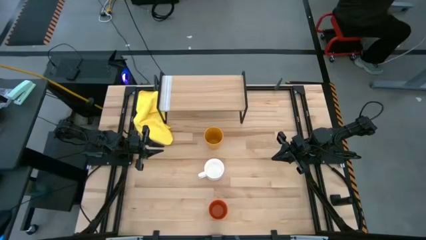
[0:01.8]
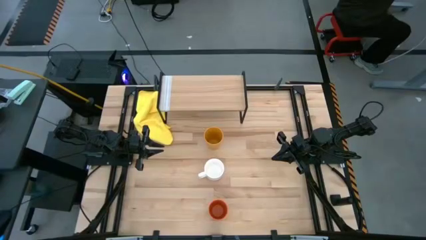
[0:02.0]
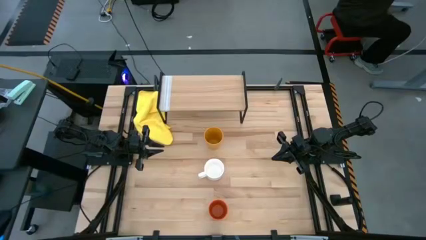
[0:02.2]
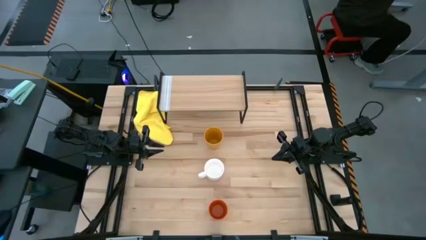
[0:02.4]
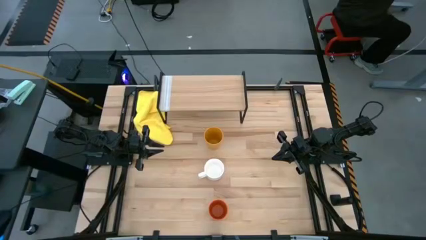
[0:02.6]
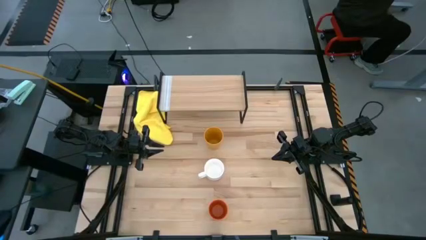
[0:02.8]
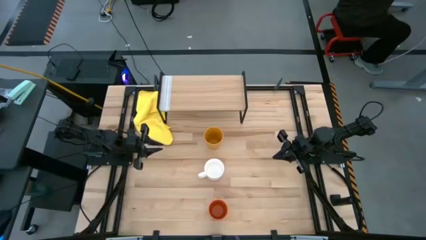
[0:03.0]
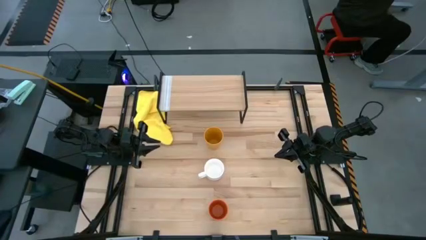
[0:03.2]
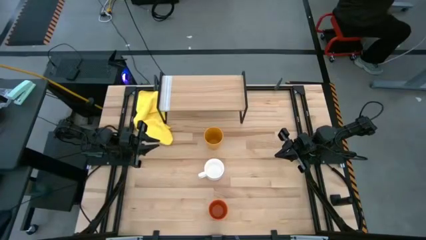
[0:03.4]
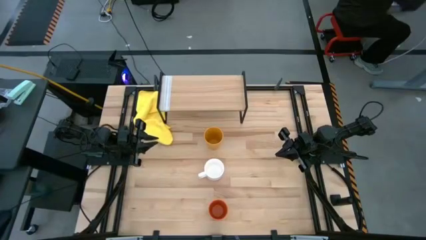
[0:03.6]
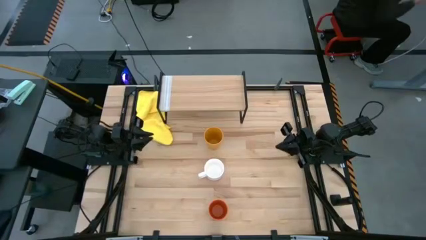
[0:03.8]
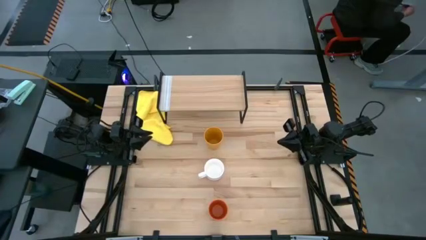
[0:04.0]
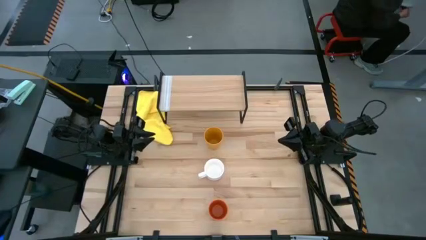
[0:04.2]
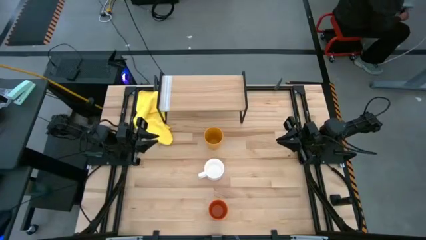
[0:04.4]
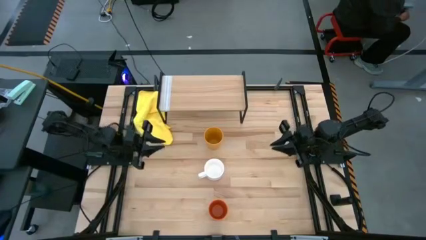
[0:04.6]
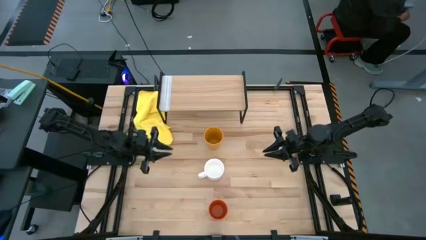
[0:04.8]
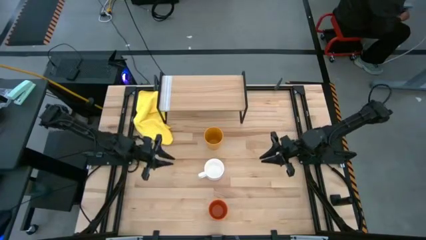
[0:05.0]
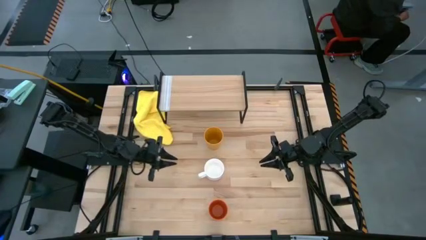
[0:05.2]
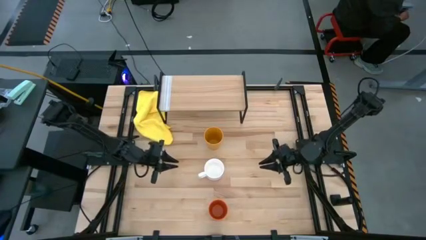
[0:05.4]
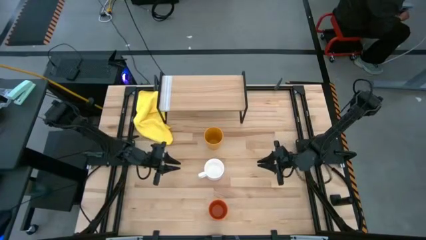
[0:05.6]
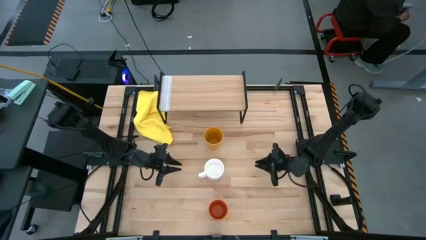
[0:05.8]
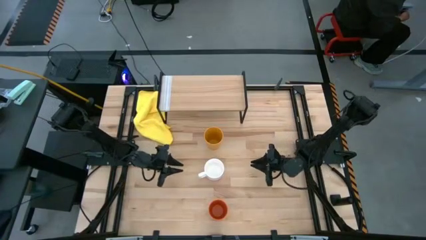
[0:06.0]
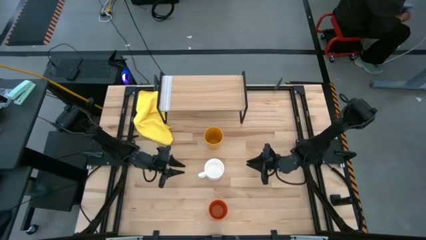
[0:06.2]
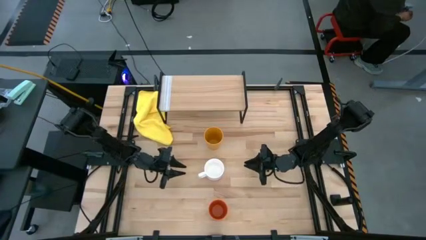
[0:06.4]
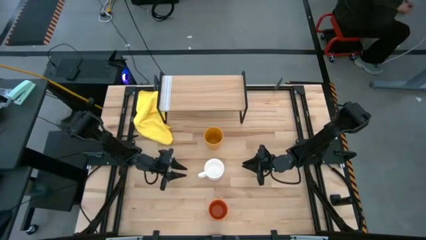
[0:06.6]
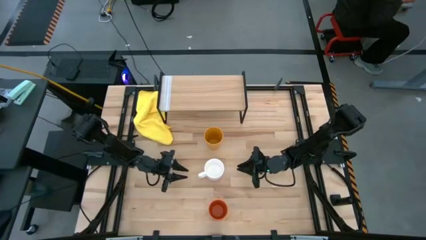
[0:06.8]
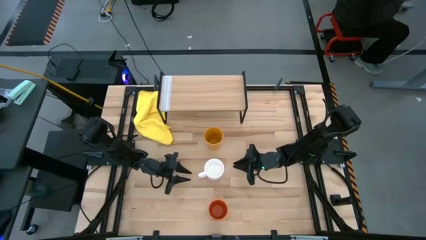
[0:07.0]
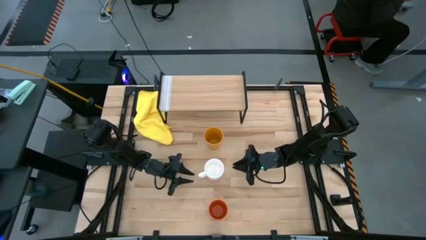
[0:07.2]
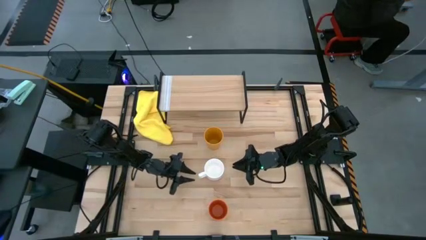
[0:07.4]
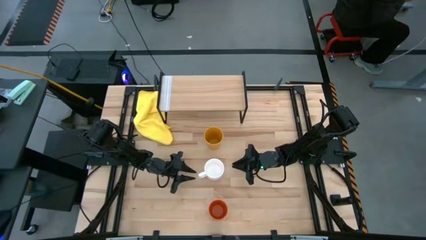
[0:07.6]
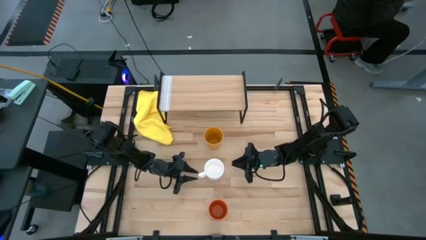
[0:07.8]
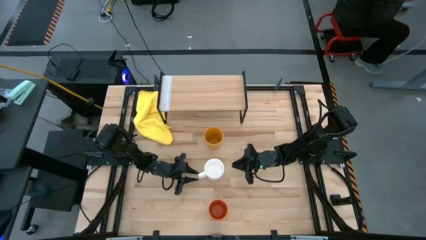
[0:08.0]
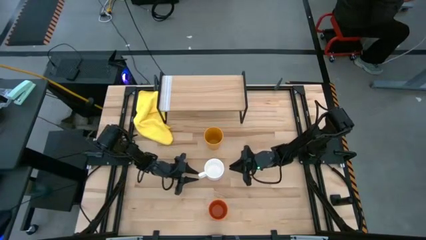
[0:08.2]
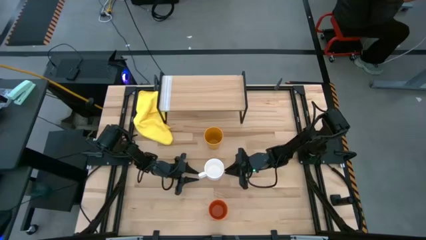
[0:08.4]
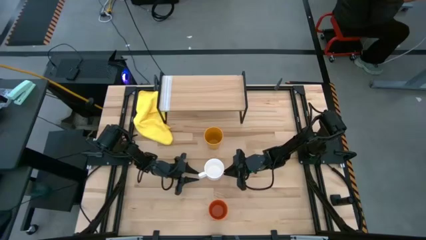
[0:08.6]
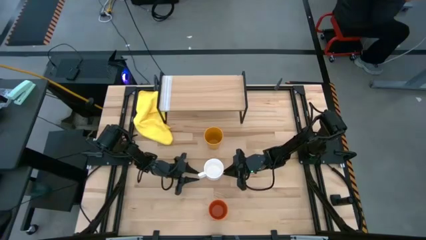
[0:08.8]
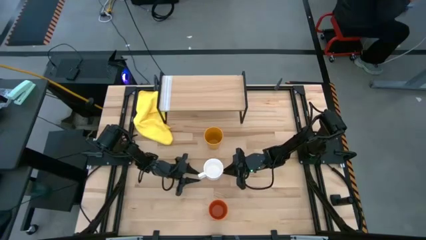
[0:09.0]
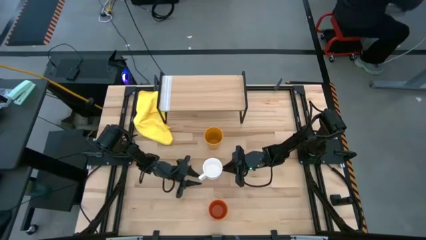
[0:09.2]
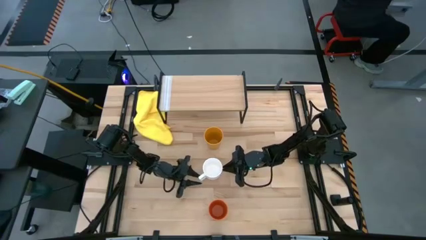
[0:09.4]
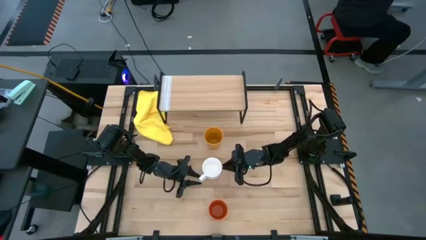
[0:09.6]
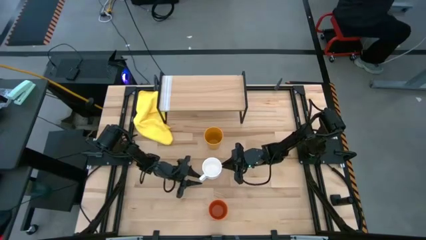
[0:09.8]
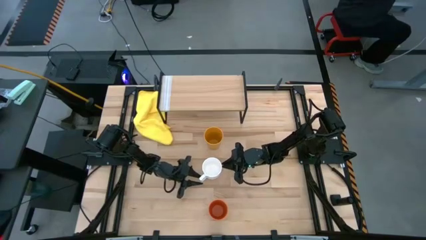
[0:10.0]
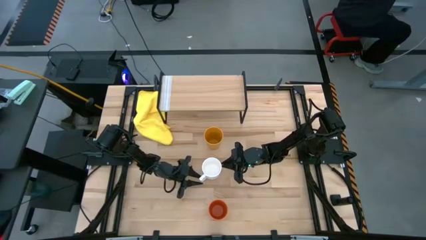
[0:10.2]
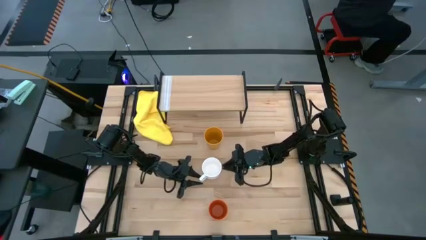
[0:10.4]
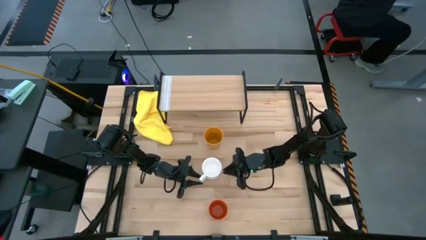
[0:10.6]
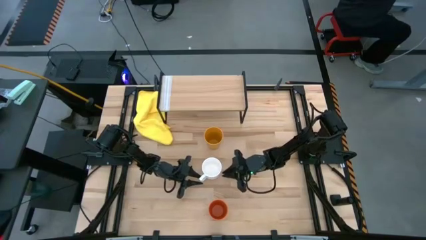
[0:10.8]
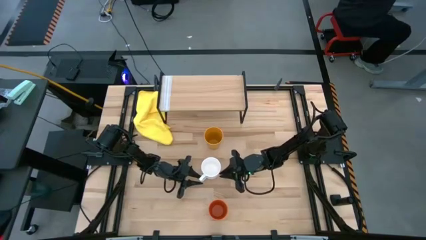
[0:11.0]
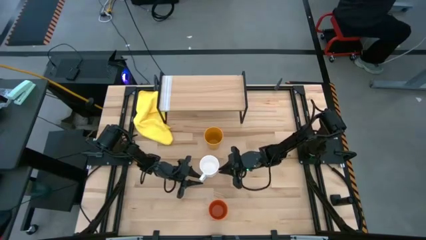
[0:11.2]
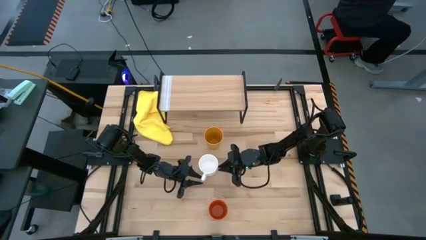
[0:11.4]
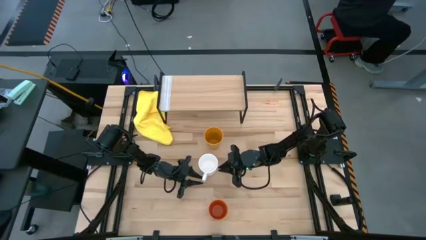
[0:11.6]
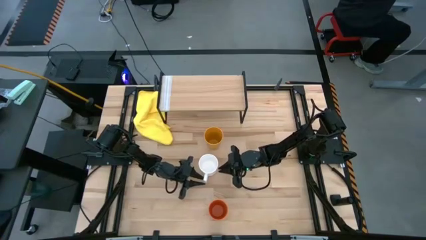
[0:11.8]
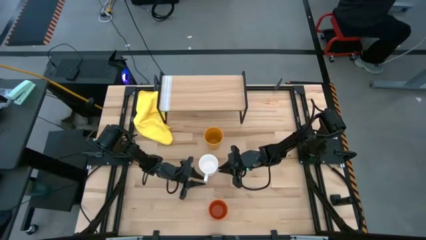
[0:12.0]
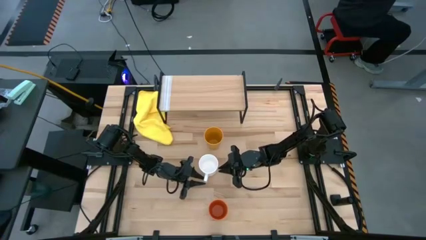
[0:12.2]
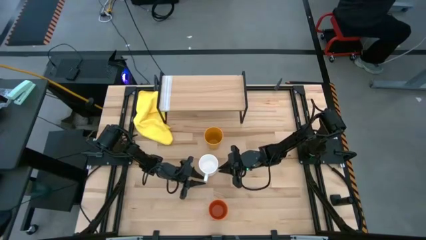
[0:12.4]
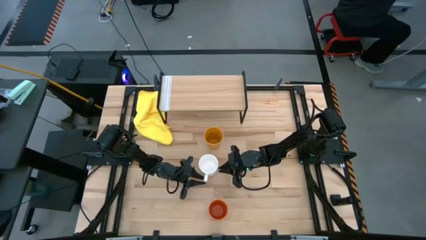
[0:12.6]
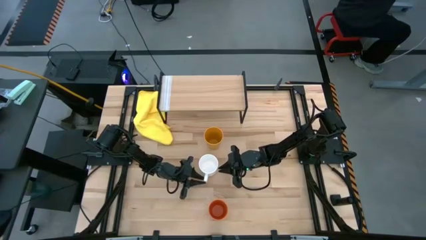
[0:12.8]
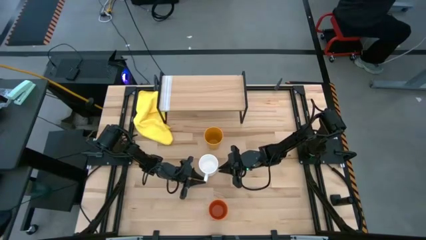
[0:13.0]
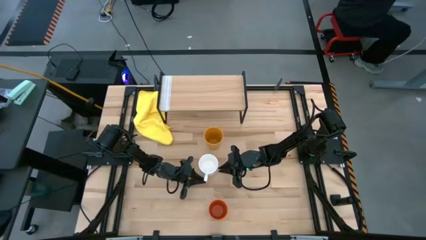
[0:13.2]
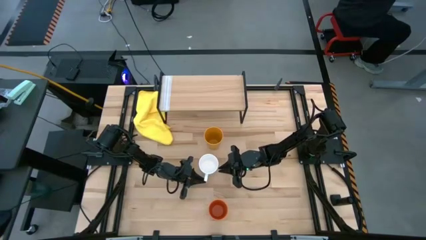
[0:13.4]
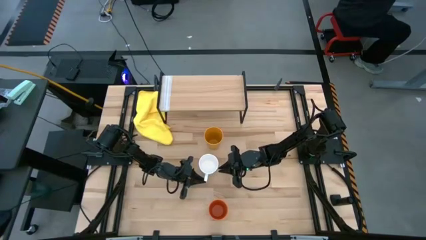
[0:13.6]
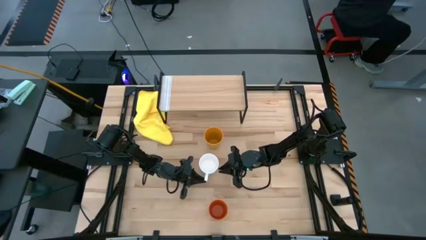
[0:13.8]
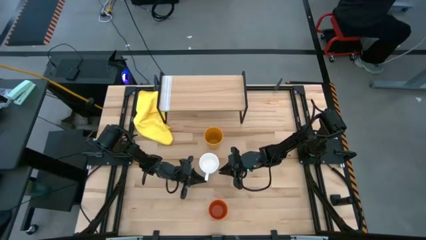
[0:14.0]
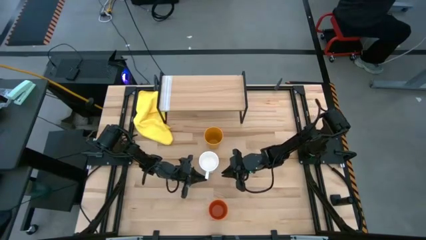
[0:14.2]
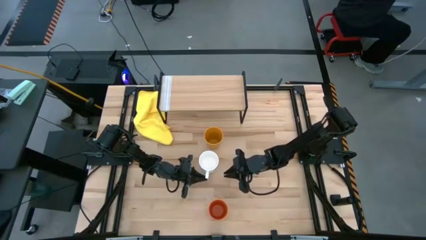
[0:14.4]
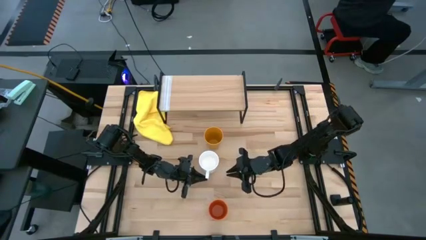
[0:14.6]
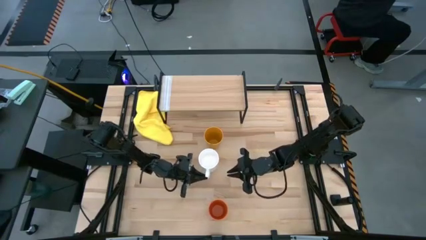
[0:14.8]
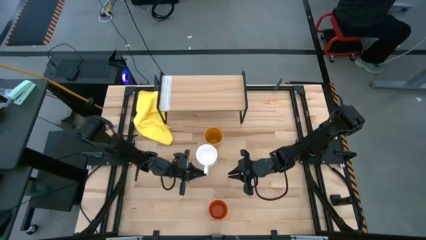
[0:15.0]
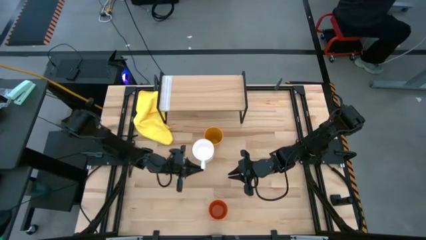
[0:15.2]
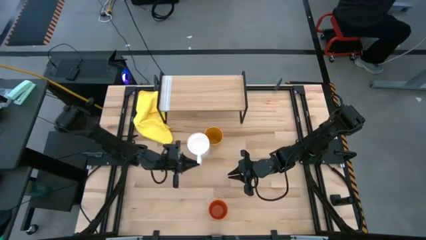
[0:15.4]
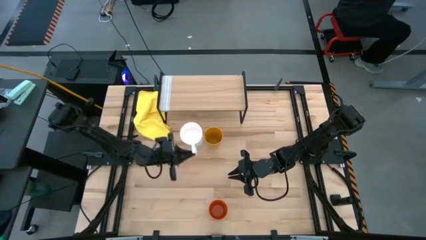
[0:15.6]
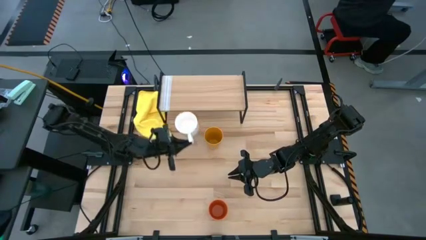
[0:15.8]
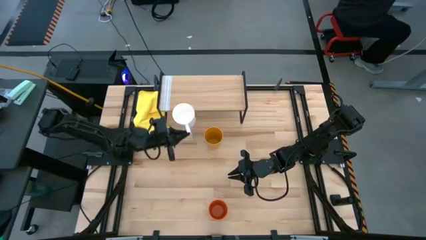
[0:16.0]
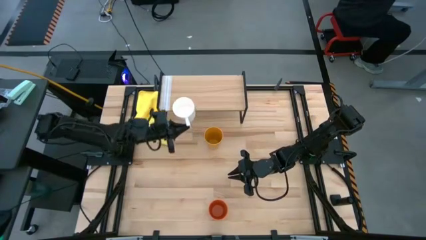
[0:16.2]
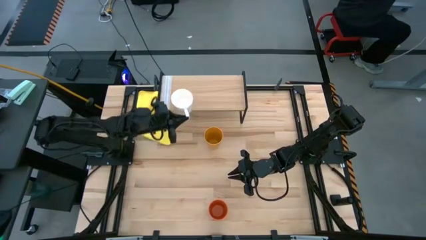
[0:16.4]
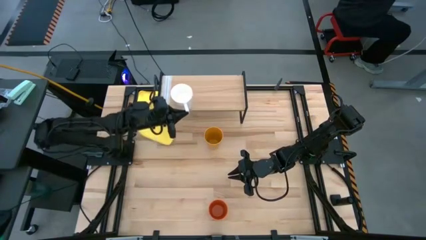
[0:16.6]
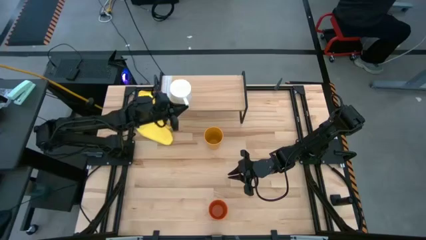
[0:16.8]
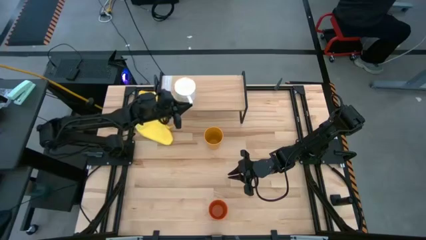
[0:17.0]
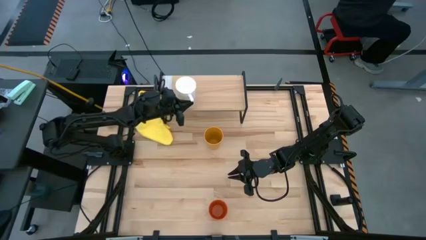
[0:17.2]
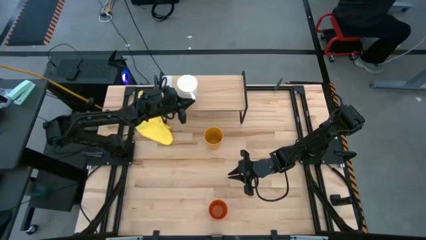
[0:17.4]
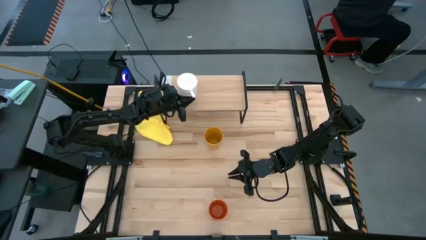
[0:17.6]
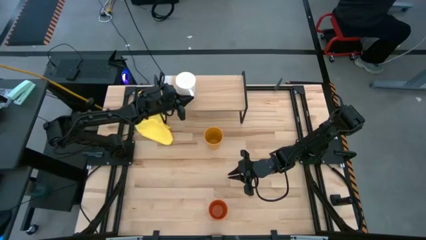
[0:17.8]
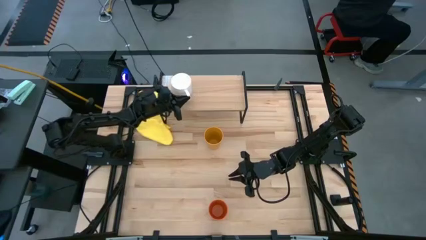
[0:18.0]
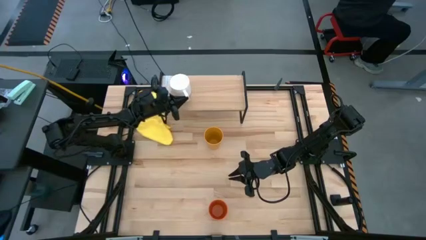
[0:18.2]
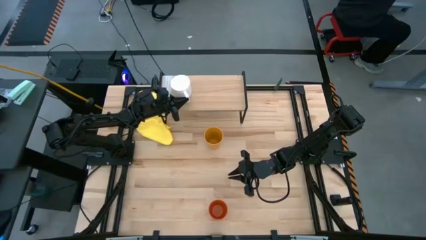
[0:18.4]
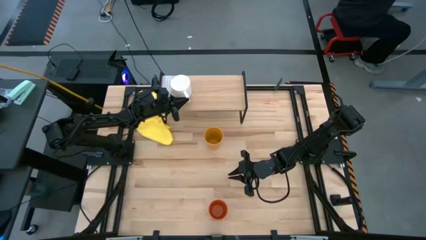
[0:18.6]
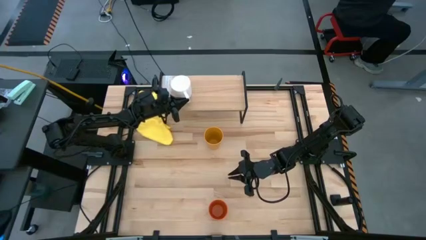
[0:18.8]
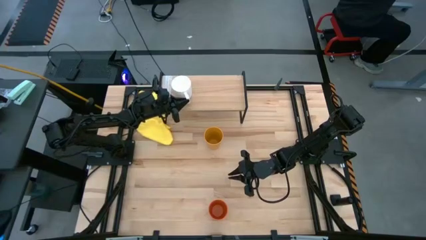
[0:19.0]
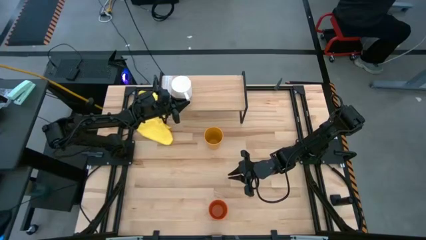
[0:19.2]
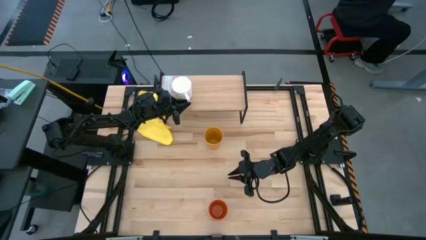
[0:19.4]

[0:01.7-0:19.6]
Task: Stack small to large cups/mugs on shelf
Put the white mug on the shelf
